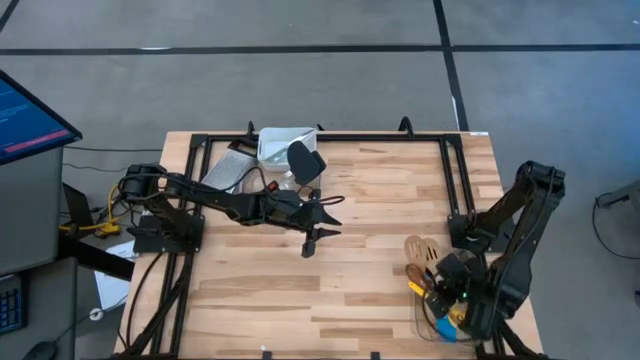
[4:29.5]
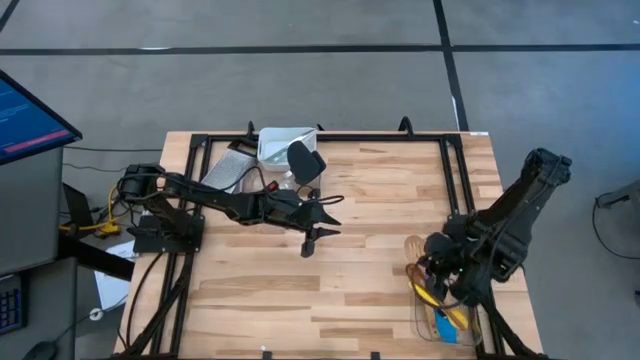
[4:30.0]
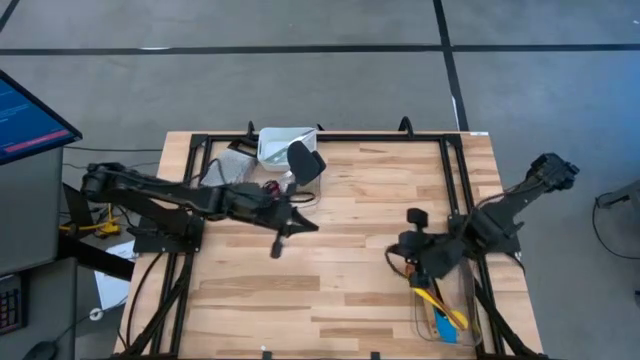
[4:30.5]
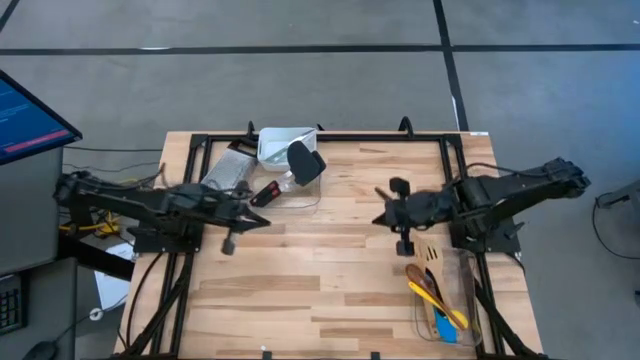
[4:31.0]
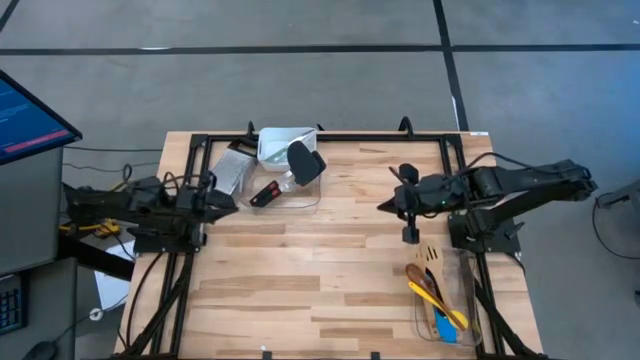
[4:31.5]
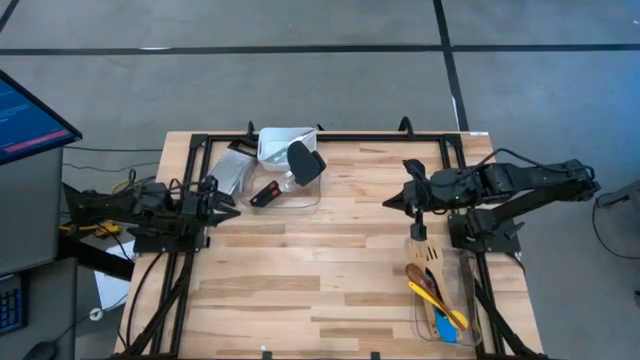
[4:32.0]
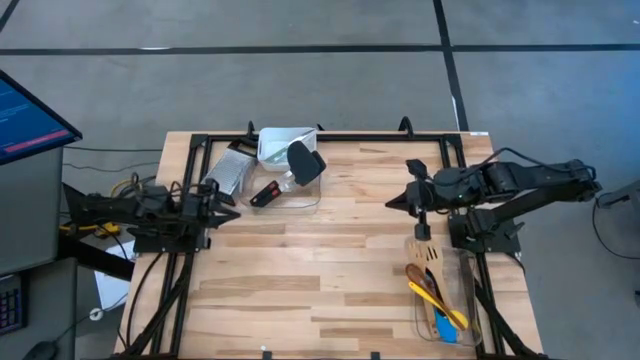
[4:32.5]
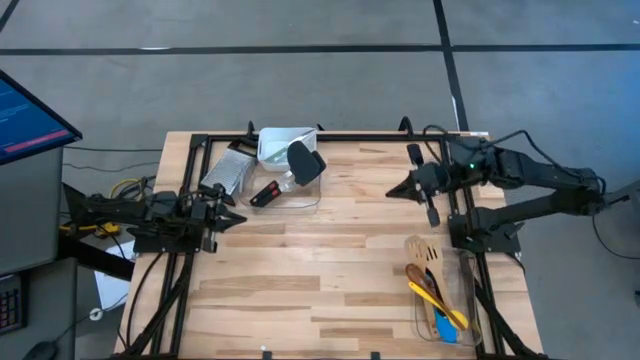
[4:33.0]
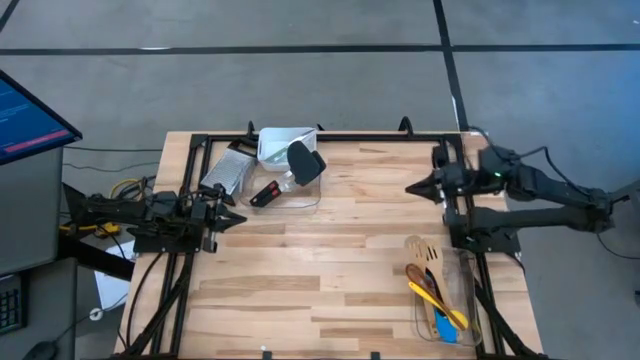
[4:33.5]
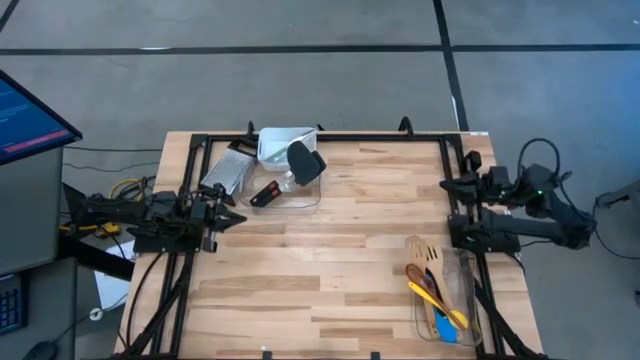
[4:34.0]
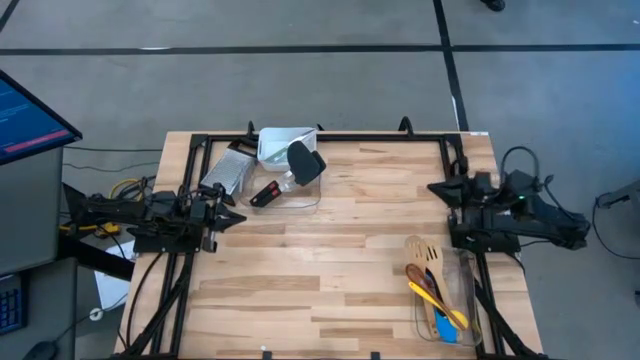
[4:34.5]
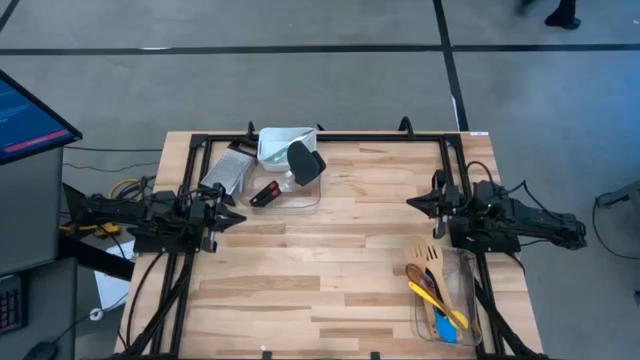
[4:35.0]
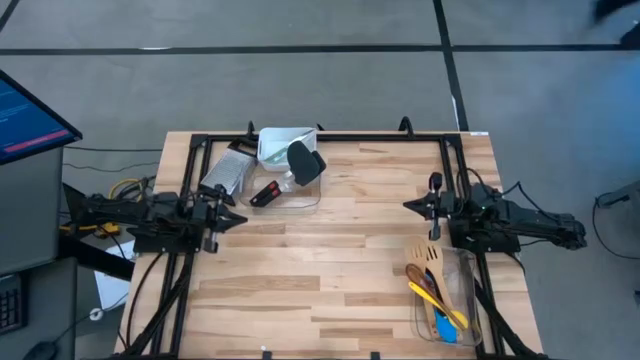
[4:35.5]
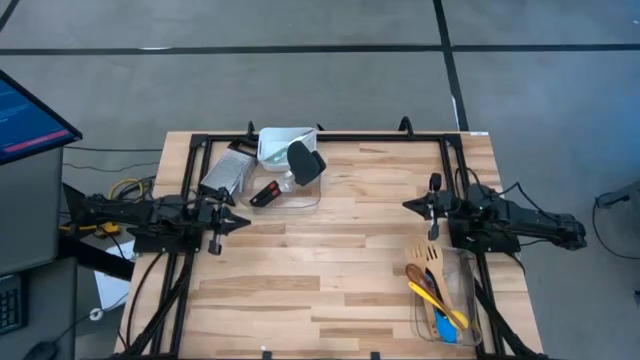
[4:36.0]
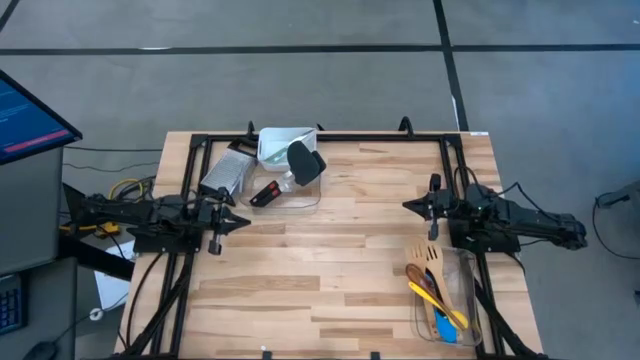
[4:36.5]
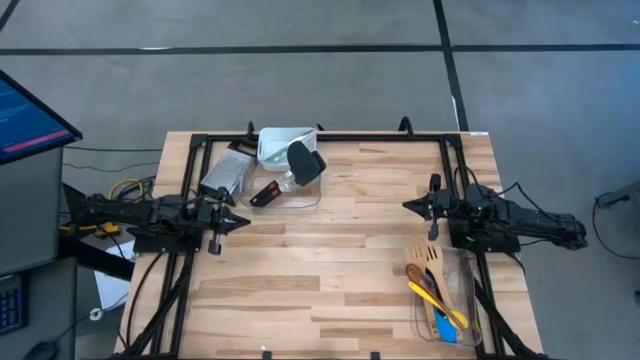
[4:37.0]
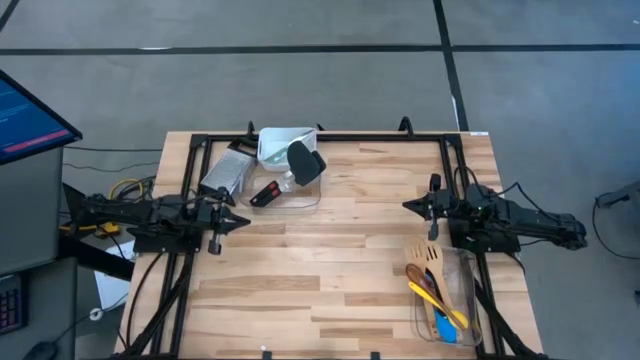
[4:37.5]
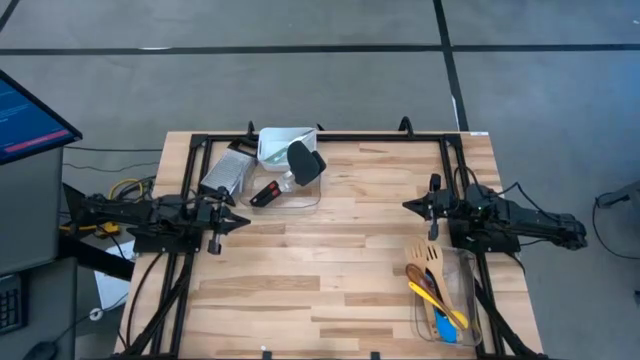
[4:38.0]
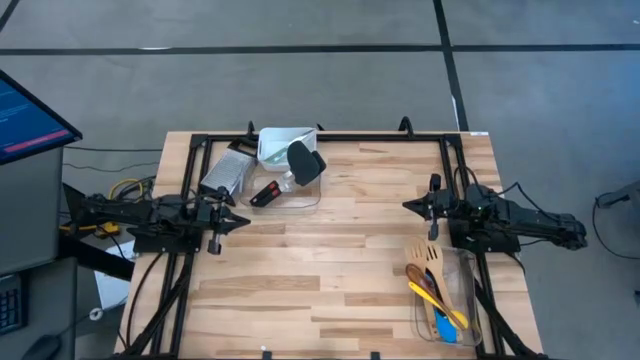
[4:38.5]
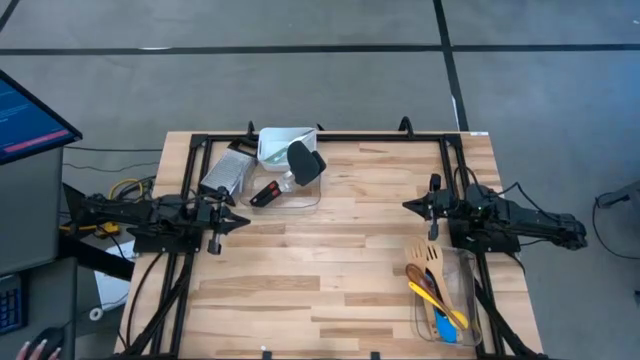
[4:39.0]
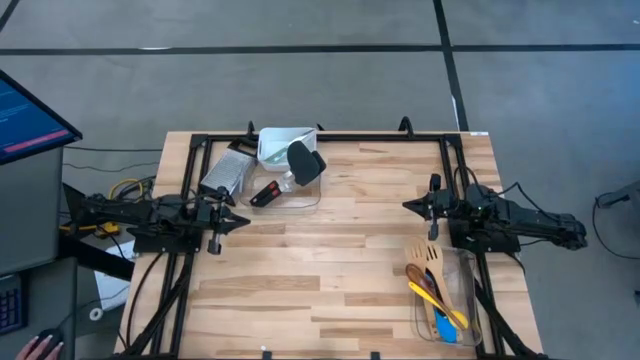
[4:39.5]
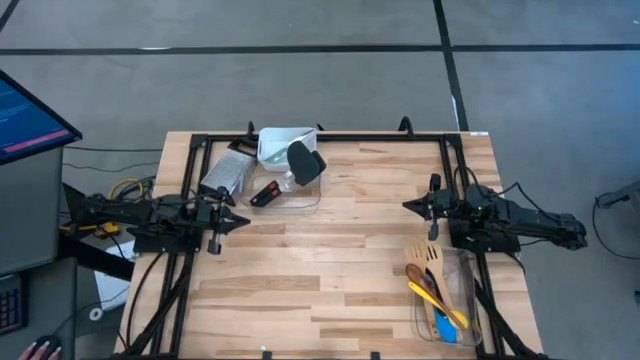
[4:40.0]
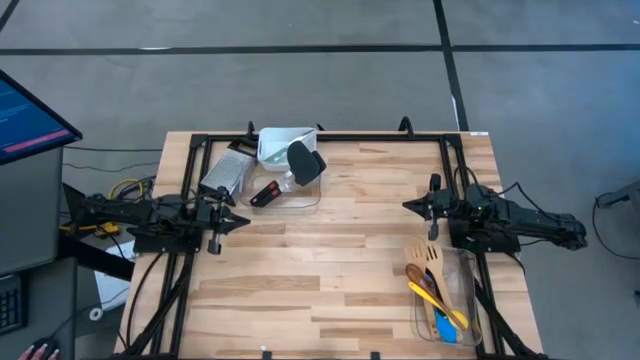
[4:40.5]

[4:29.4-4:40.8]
Task: Pick & Place Kitchen Items
Return to Home Position

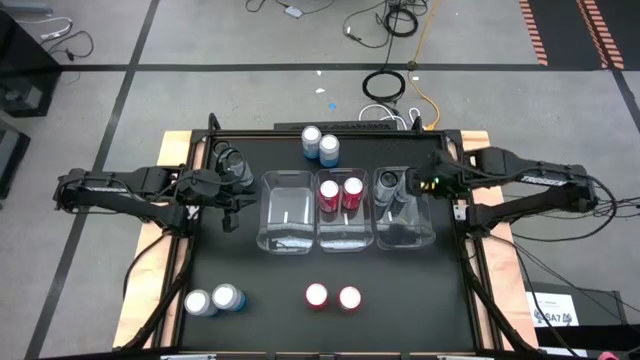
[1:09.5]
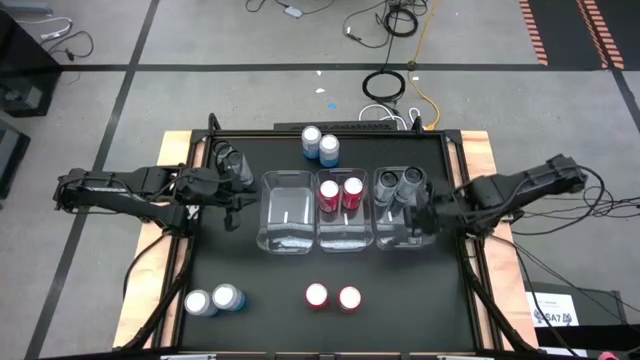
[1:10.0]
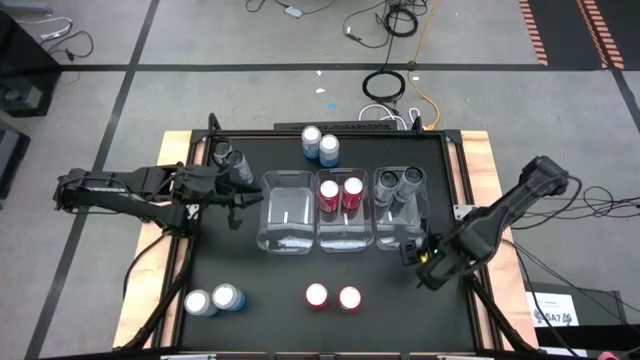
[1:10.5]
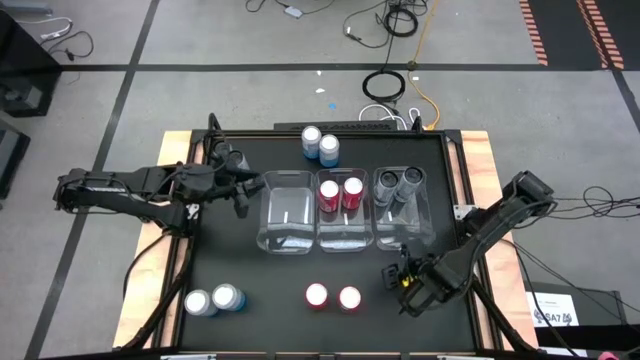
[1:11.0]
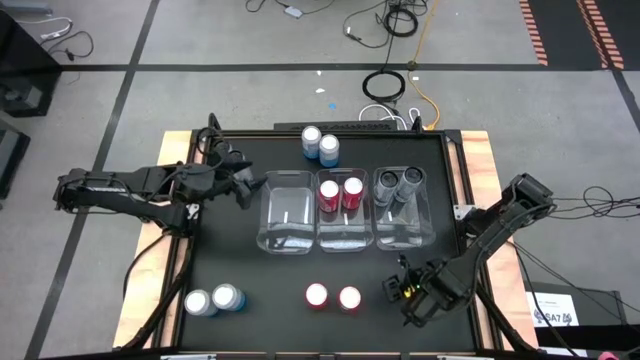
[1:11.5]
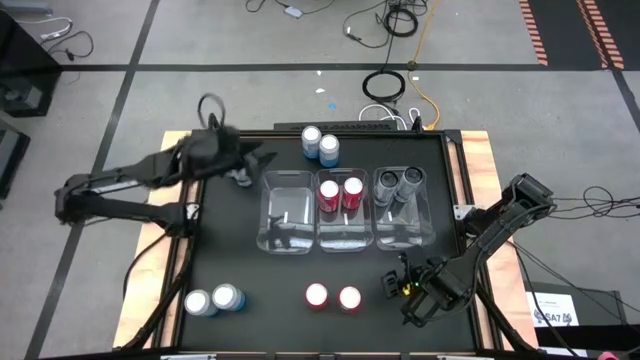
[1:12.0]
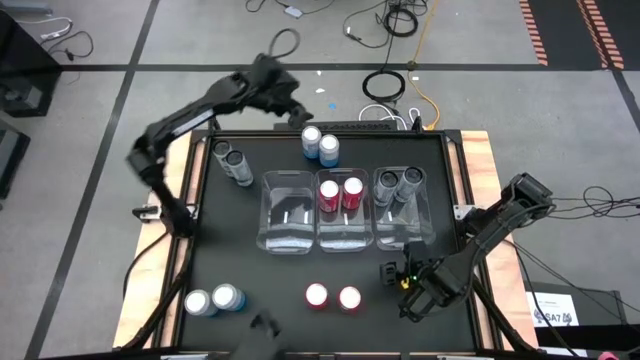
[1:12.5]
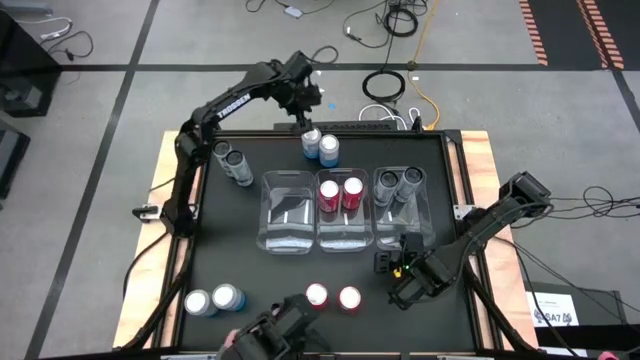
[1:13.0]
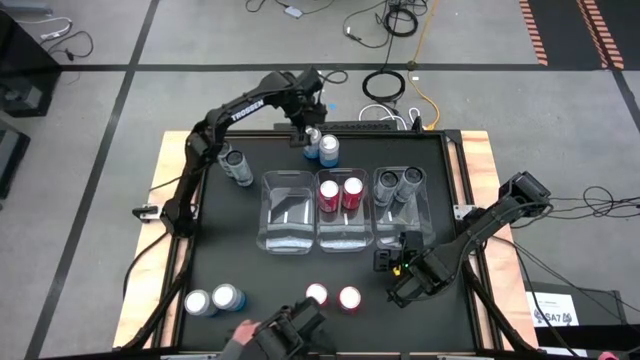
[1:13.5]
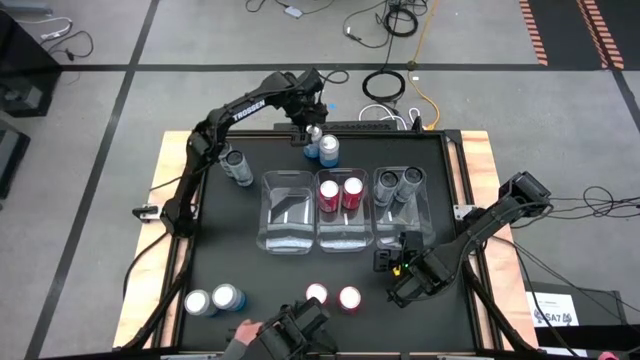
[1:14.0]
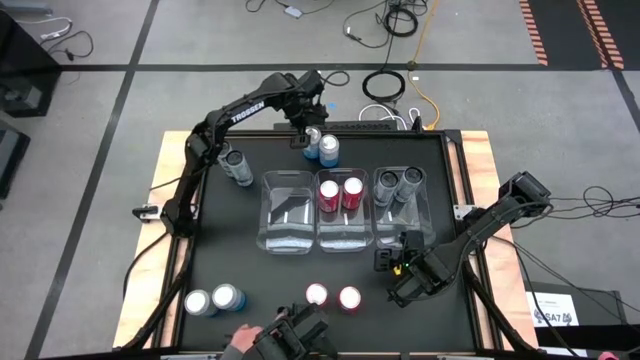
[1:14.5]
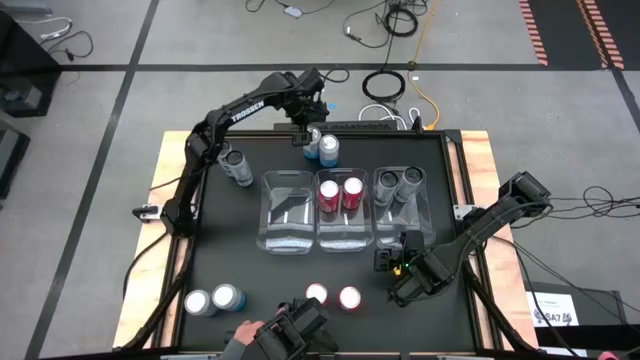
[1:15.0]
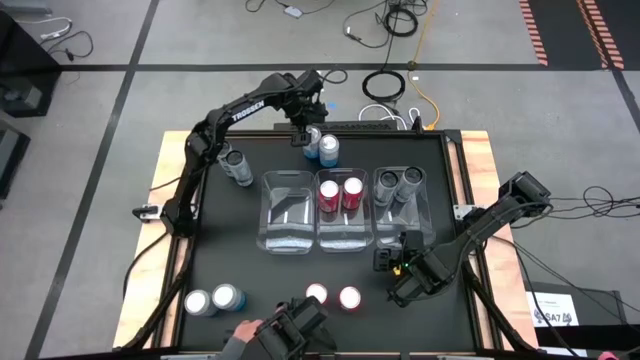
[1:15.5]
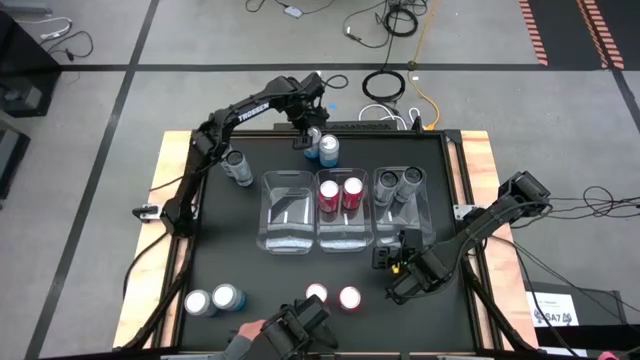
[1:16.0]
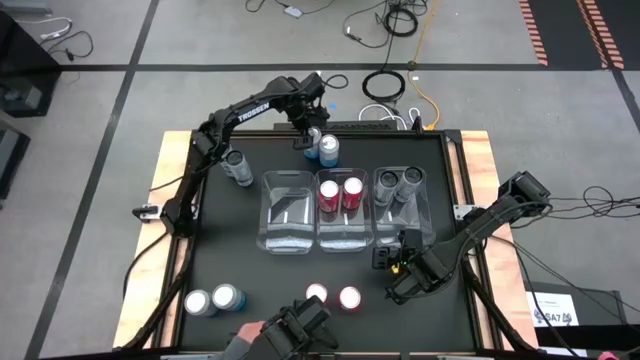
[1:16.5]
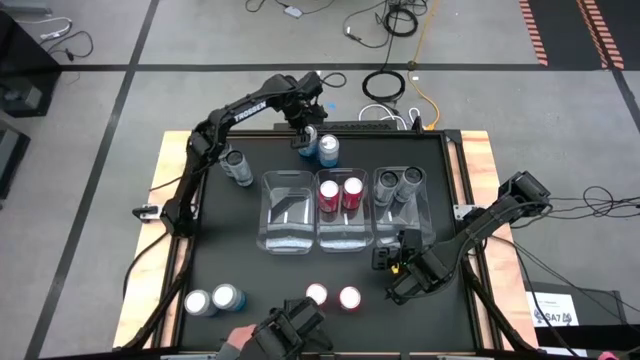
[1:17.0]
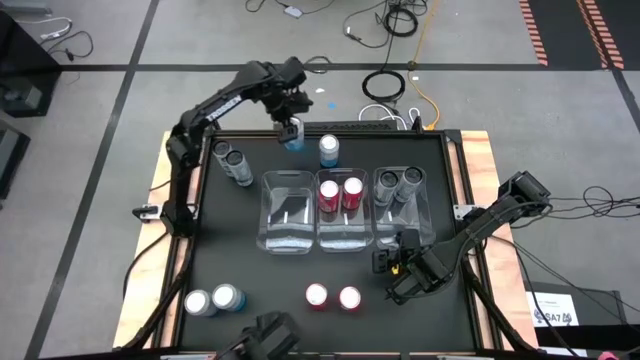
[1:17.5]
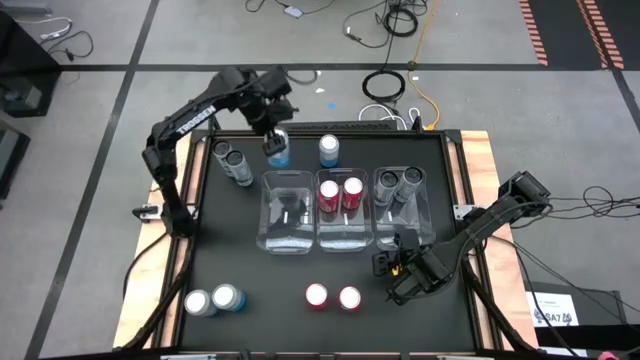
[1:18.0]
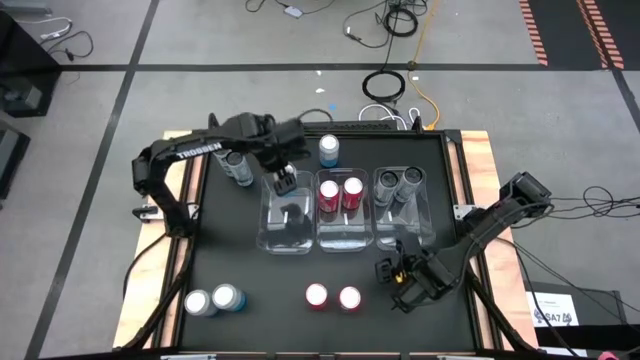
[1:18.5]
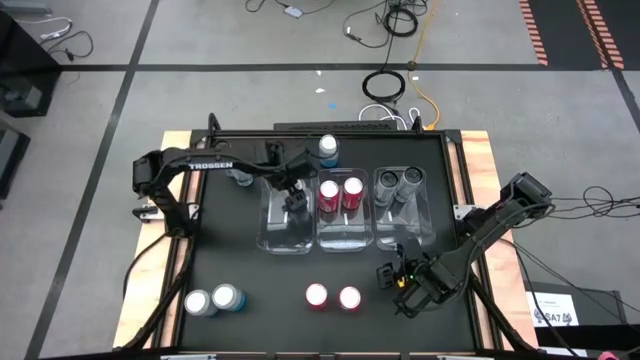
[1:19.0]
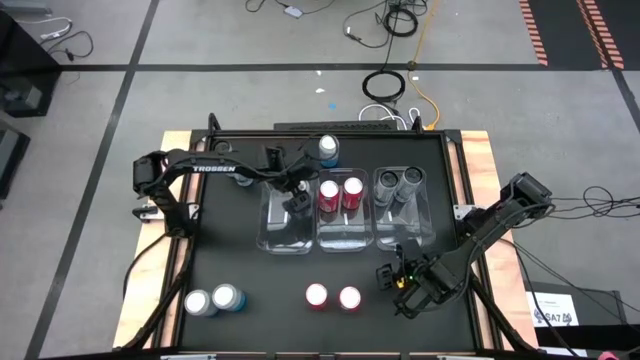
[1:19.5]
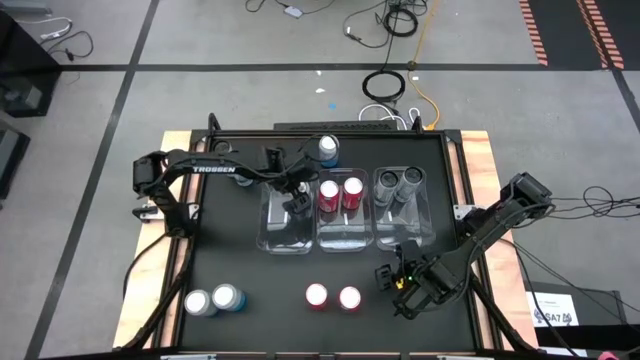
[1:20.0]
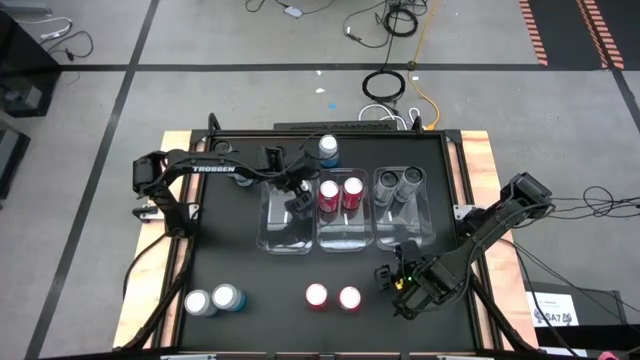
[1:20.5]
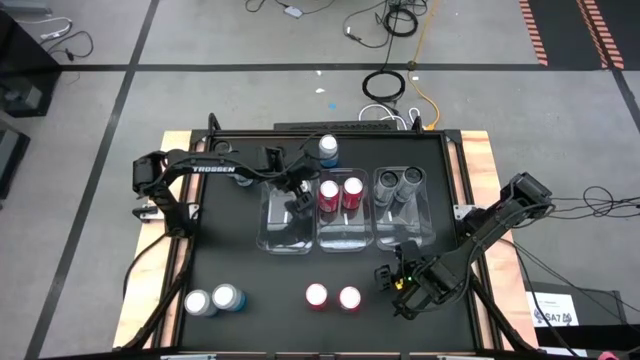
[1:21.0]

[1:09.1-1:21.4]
Task: Sort soda cans
Put the blue-white soda can into the left transparent bin
